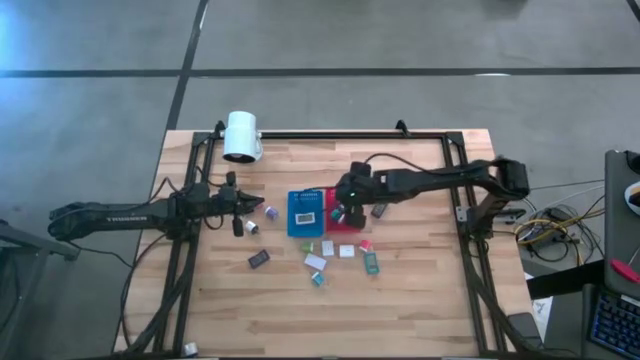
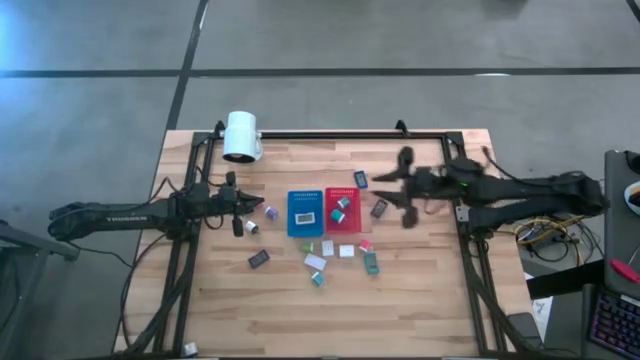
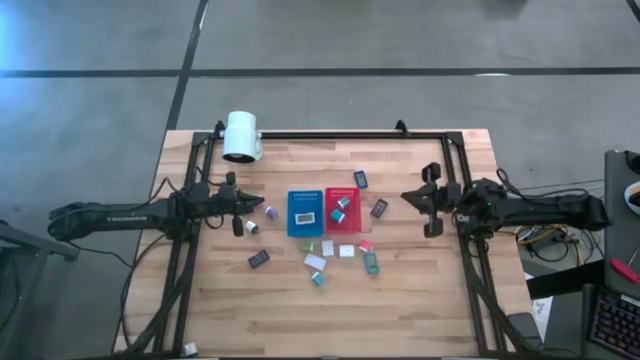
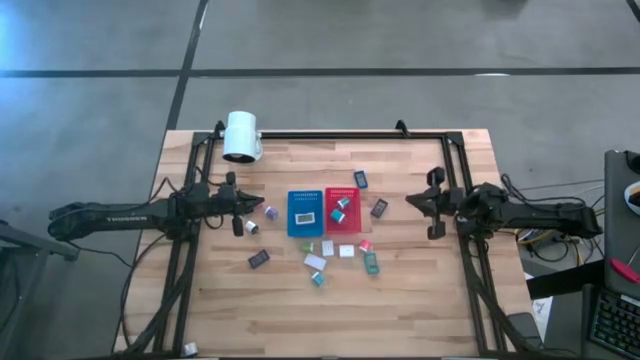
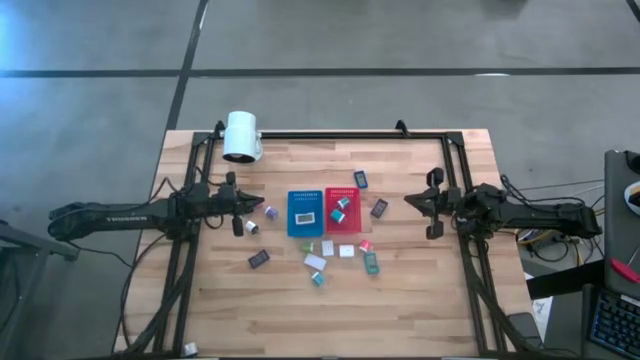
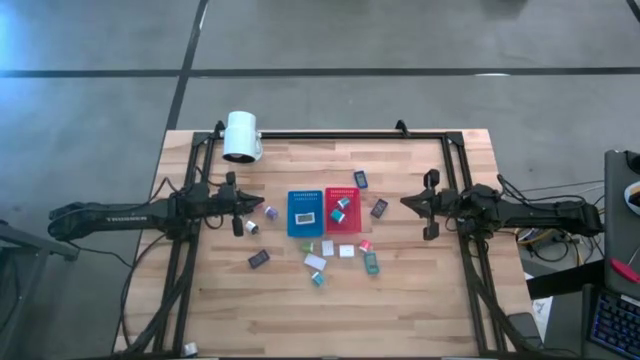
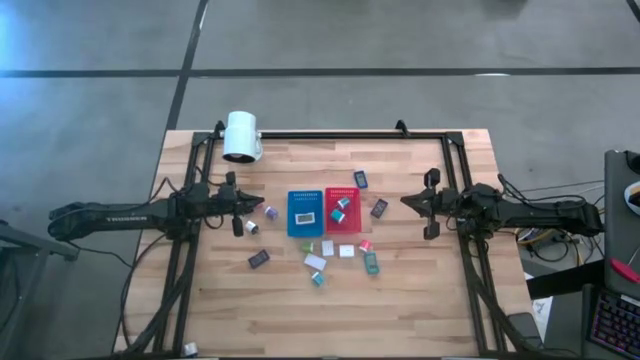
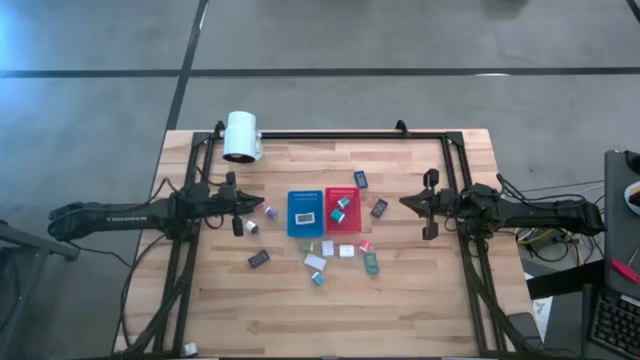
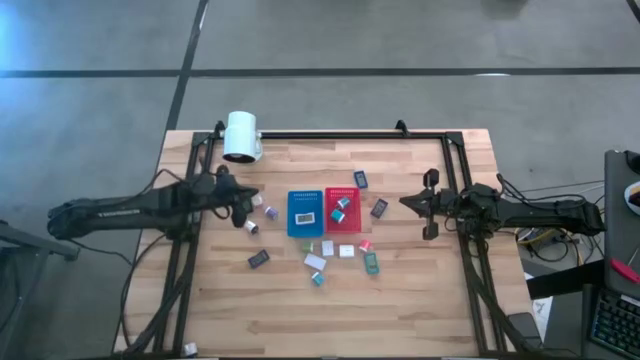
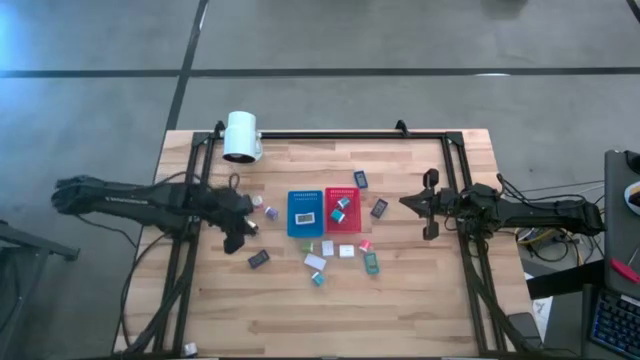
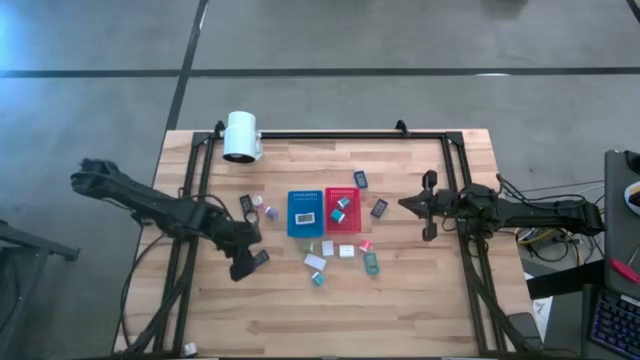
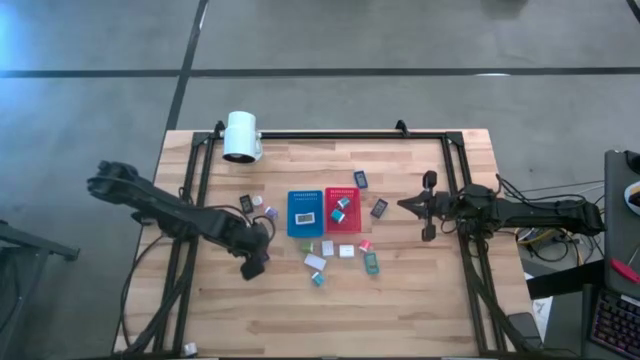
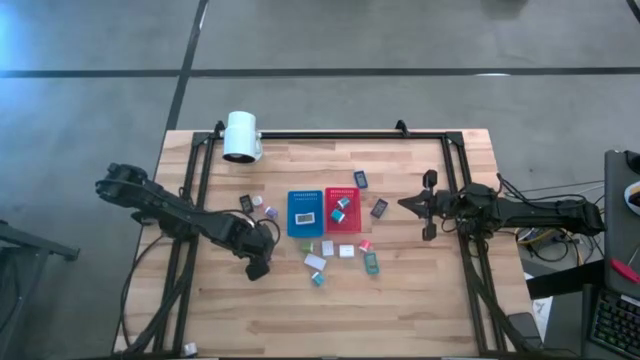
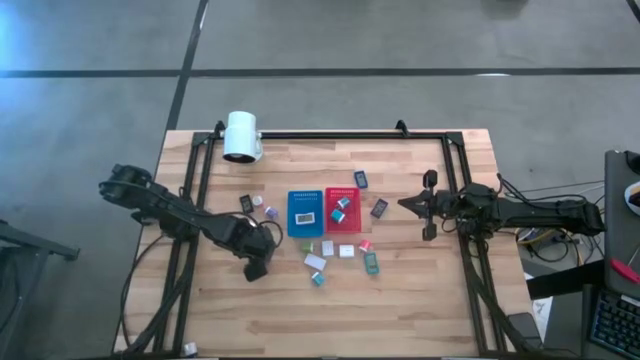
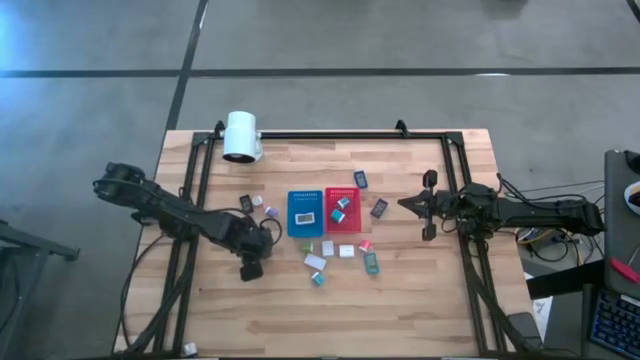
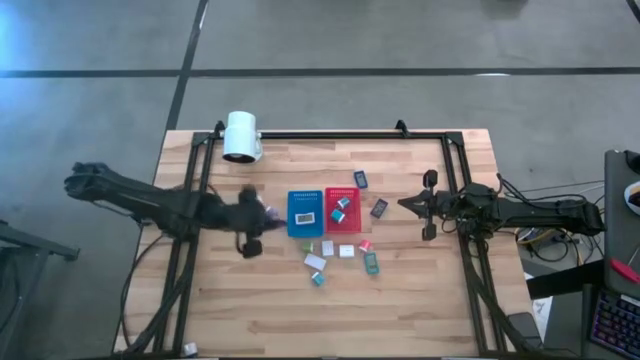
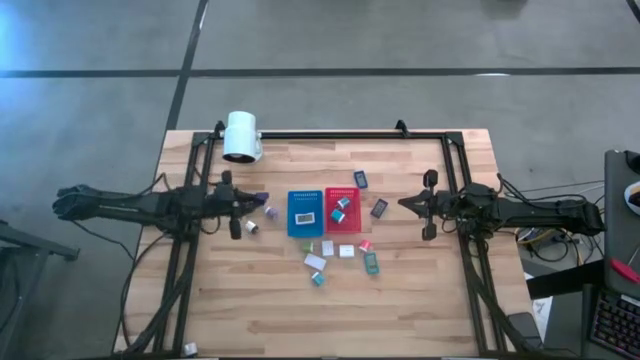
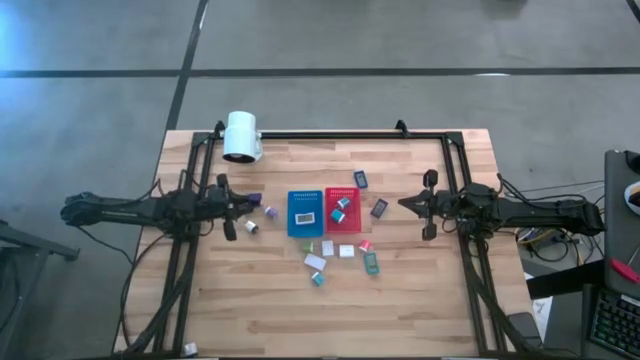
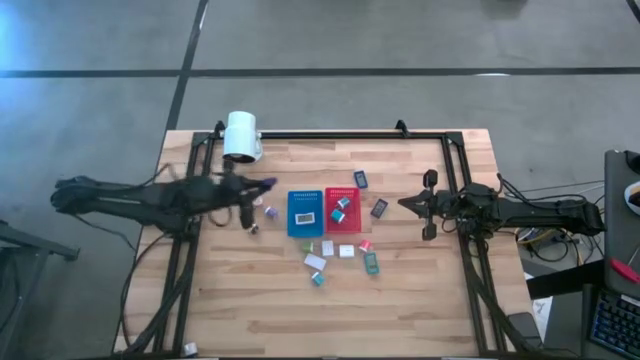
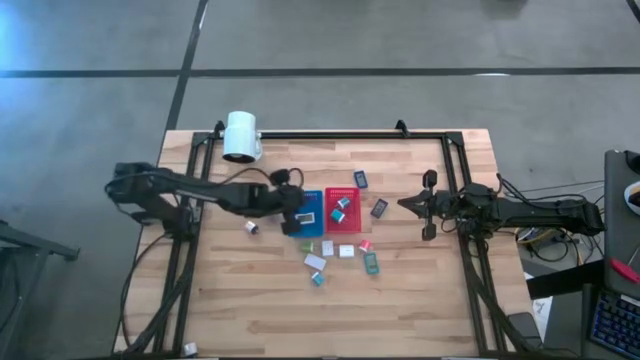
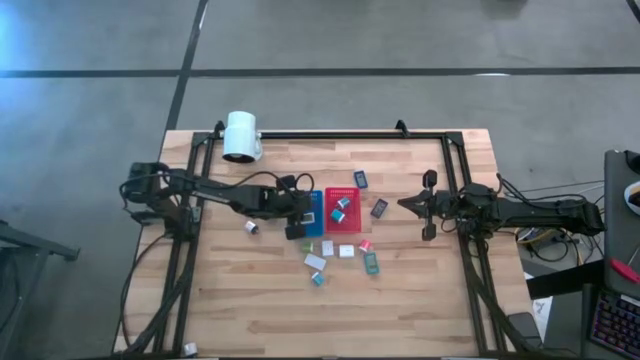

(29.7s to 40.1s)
Task: Pick & Place Office items
Put the blue digital timer into the blue bin

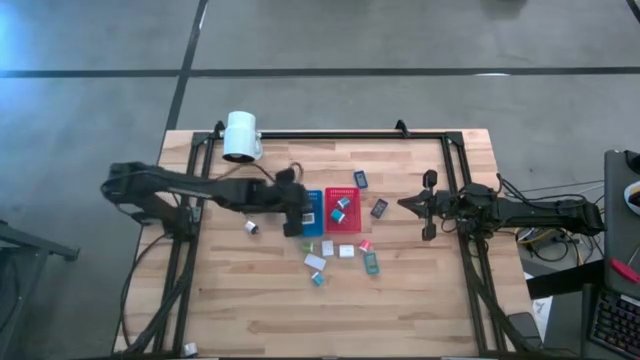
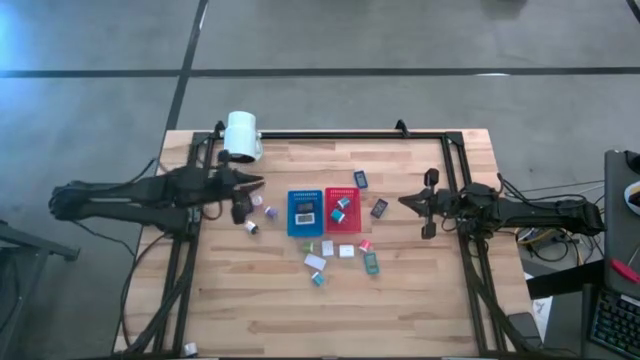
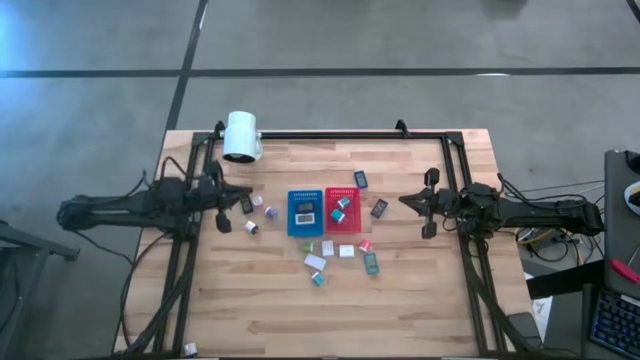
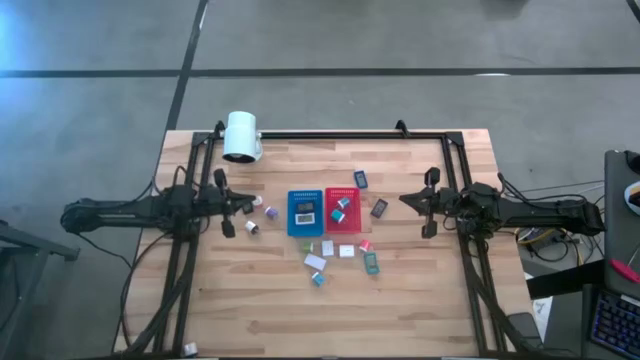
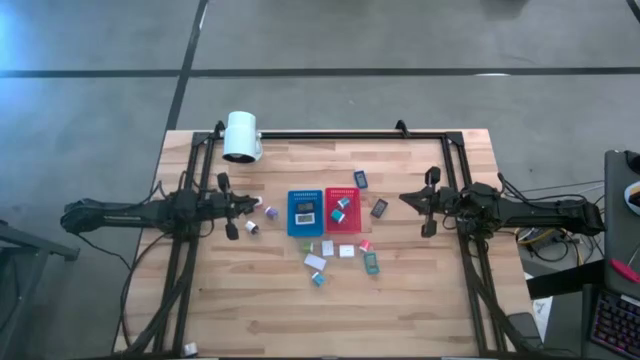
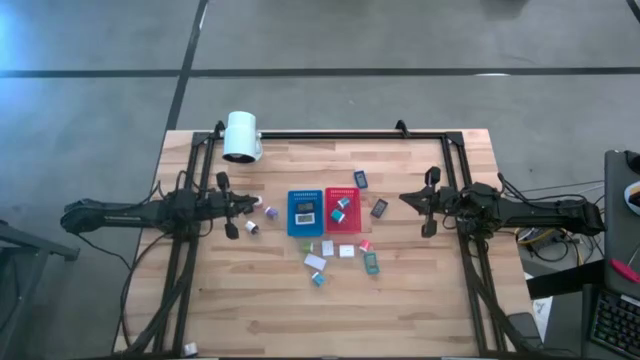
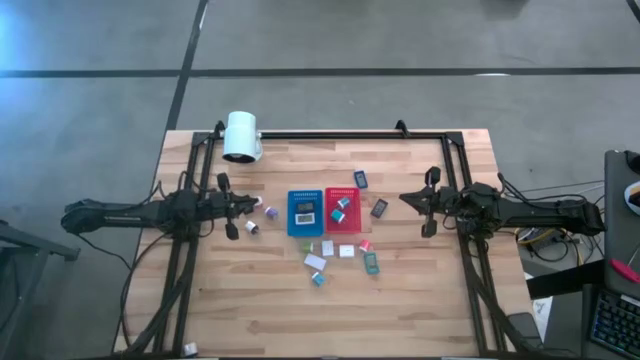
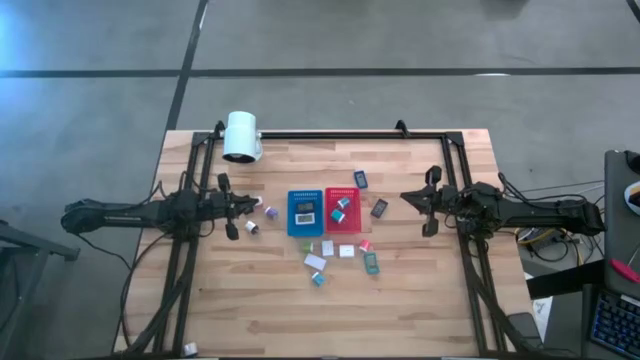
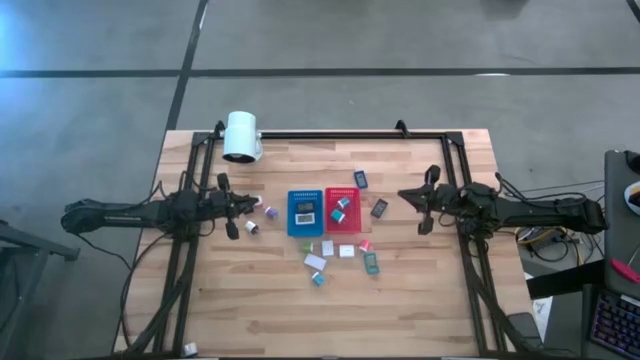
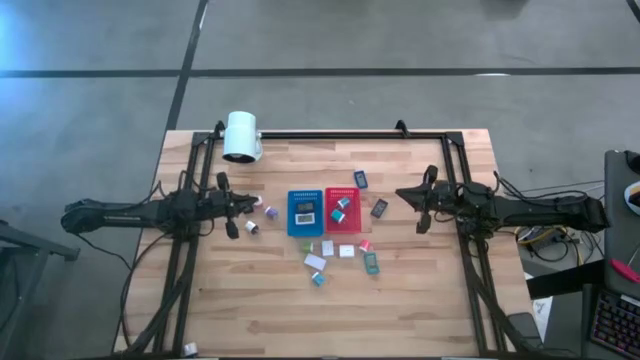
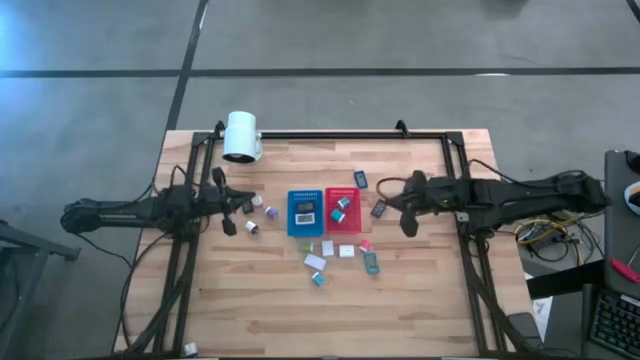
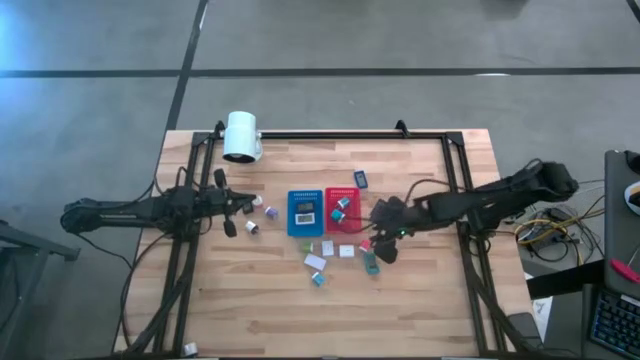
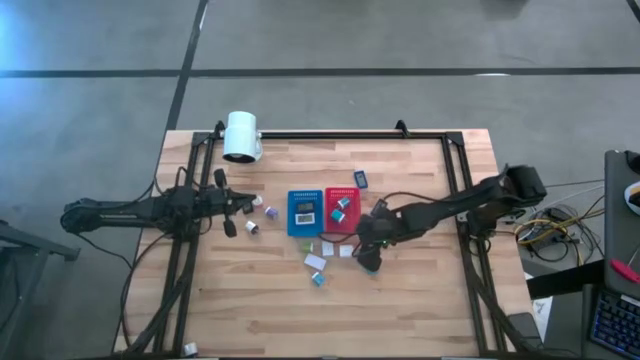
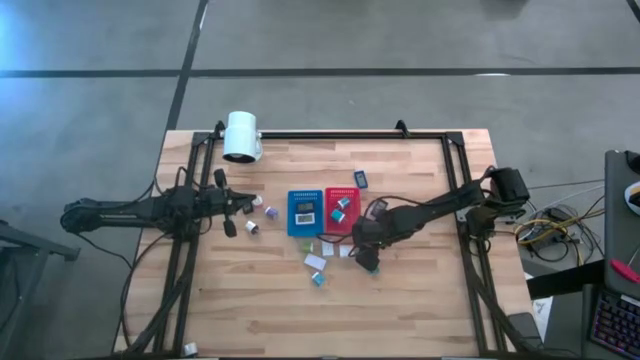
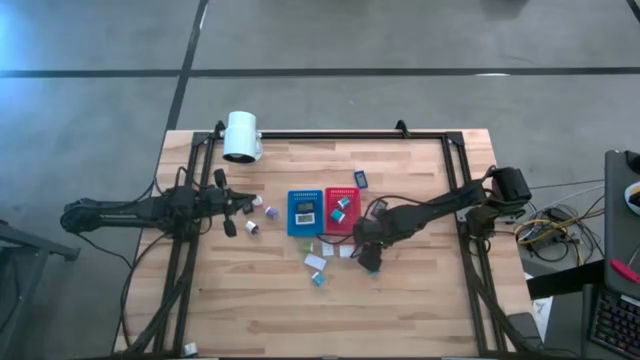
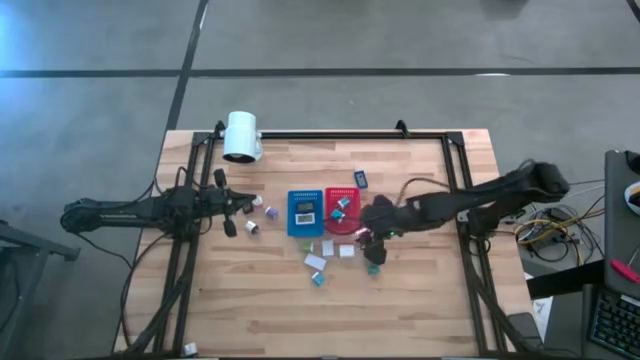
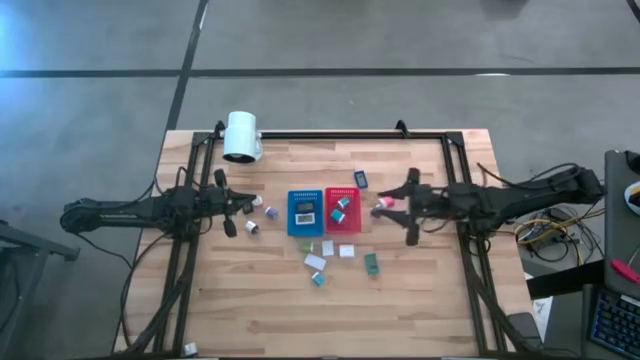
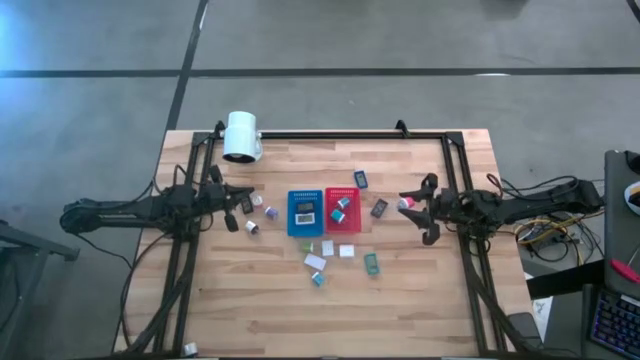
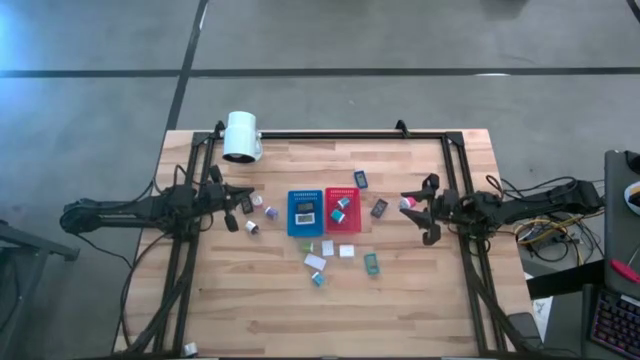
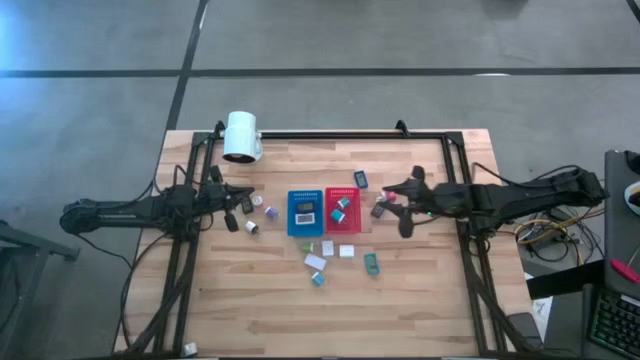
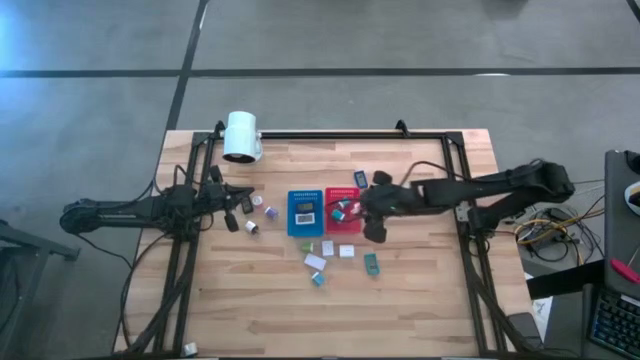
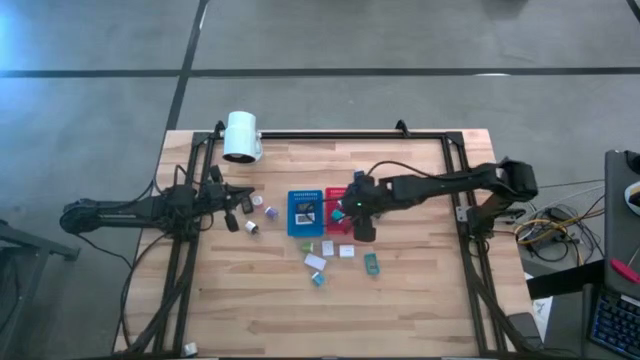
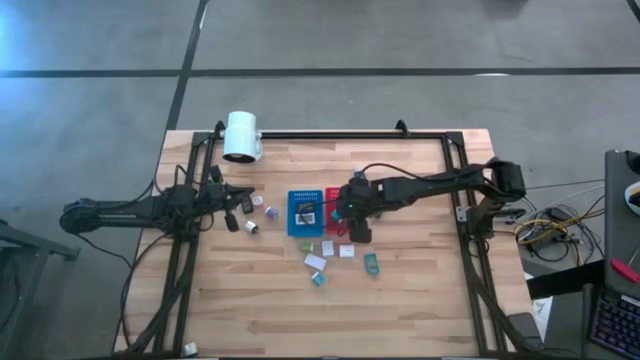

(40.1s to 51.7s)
Put the pink charger adapter into the red bin
